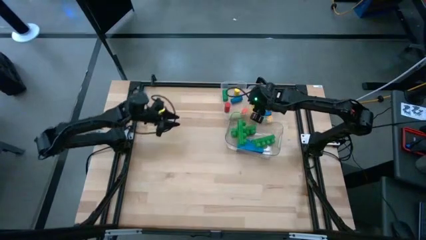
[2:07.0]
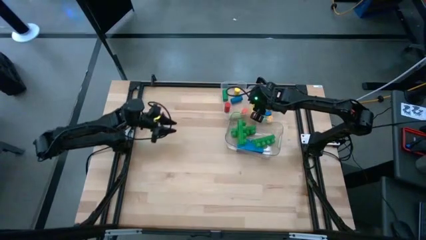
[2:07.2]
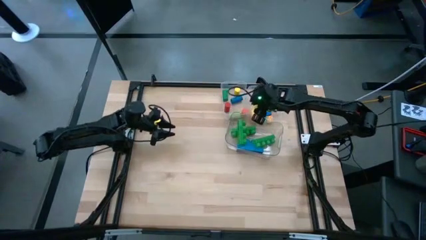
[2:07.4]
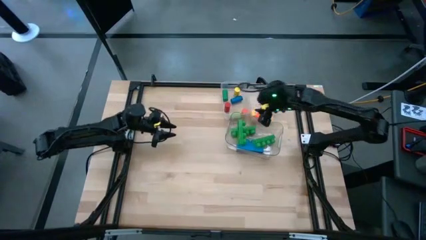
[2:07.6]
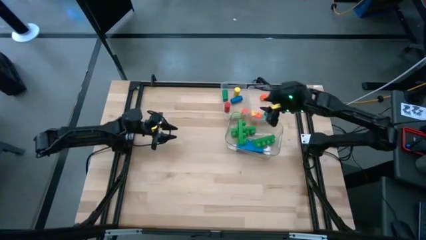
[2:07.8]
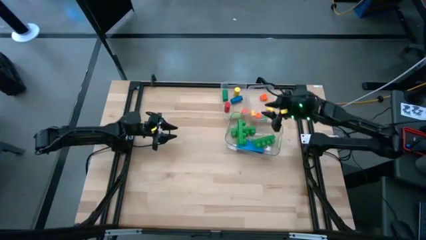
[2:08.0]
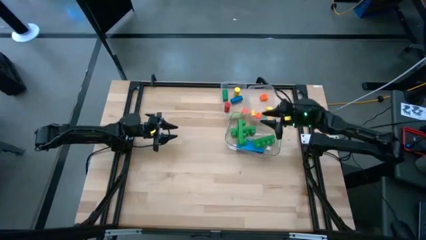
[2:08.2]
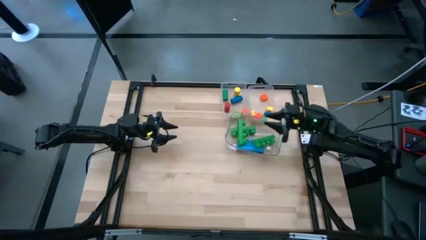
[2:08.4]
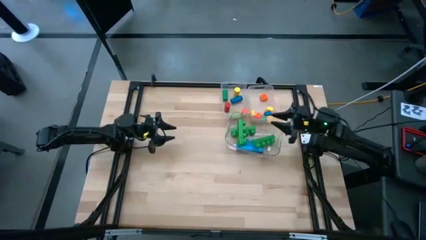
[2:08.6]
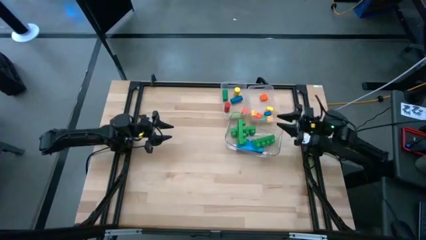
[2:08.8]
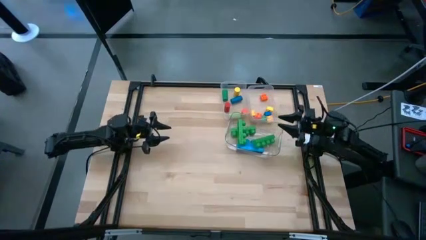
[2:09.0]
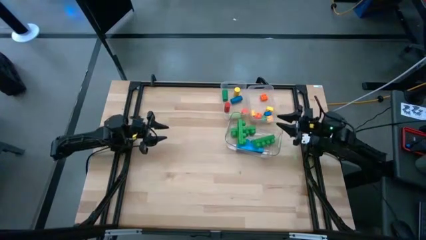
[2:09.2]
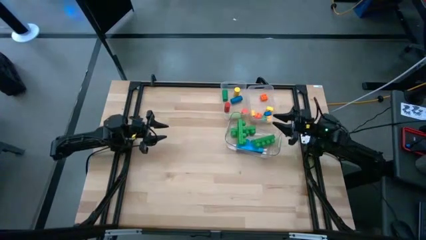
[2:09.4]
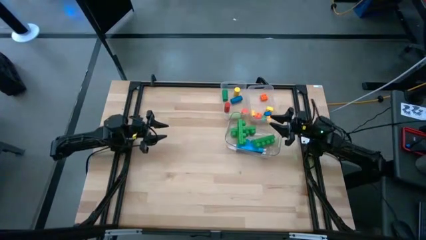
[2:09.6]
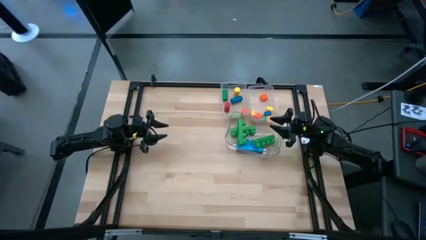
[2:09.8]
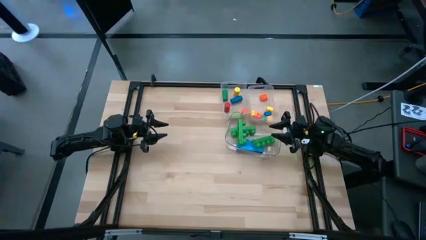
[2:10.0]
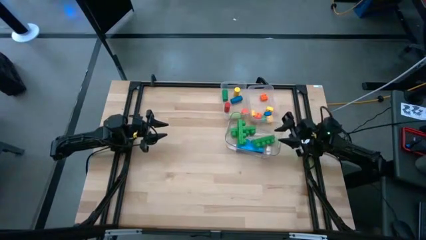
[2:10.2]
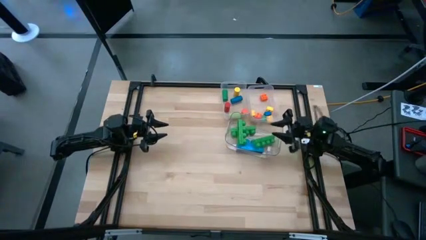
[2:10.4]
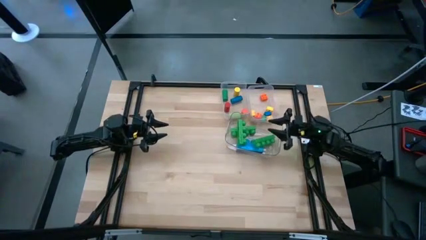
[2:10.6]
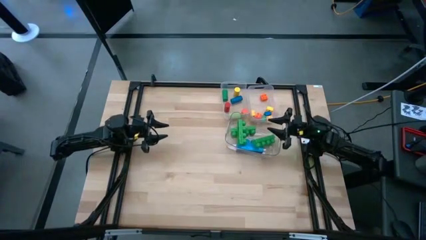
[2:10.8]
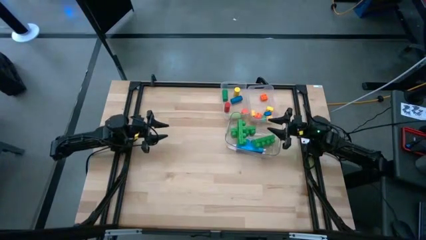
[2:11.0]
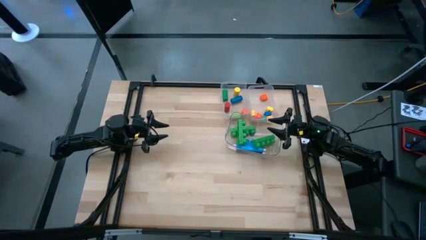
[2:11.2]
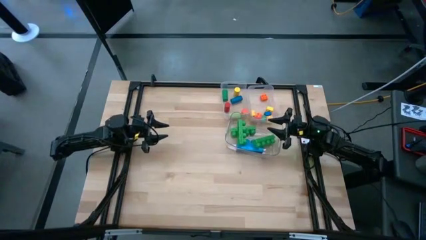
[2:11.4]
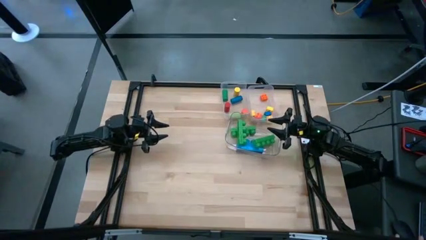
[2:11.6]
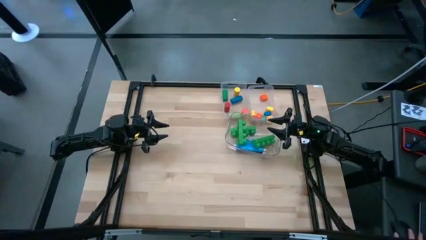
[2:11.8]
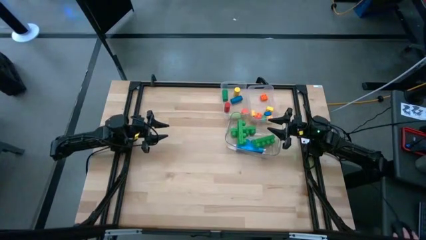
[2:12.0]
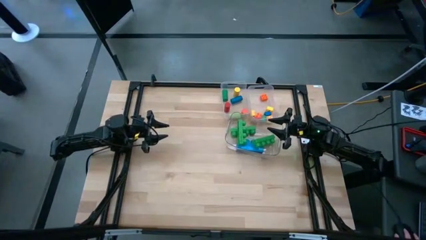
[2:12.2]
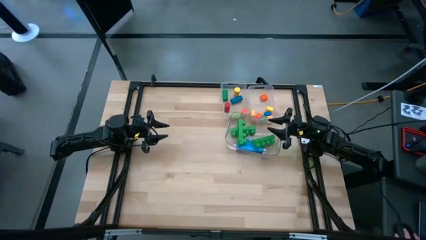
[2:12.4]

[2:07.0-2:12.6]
Task: Sort blocks by size
Return to Home Position

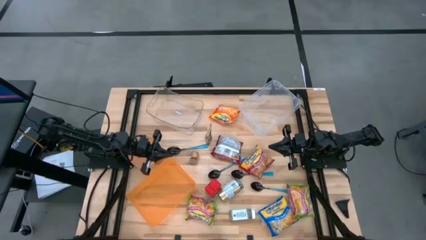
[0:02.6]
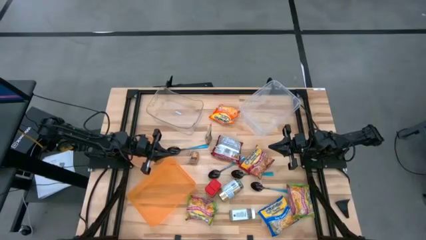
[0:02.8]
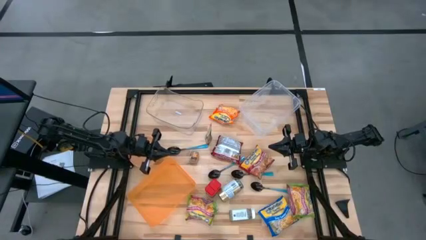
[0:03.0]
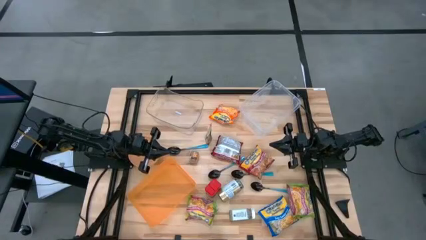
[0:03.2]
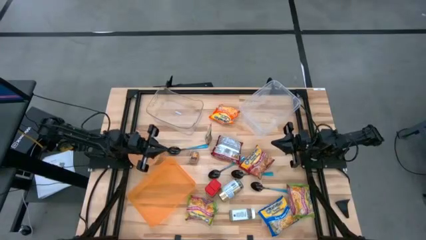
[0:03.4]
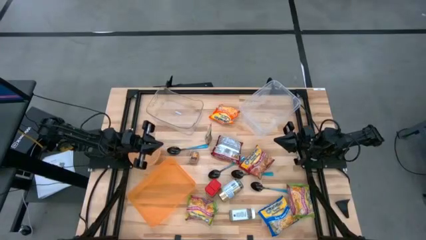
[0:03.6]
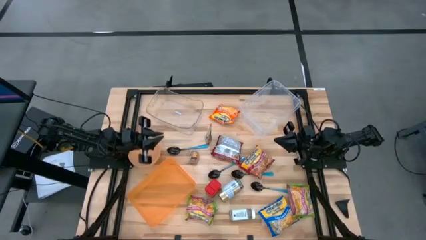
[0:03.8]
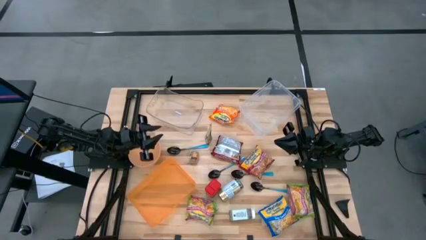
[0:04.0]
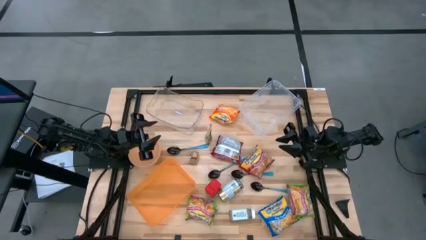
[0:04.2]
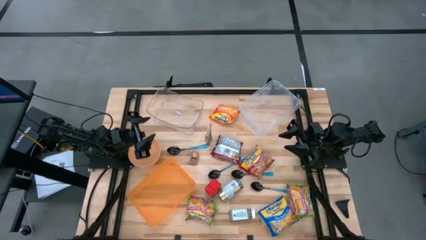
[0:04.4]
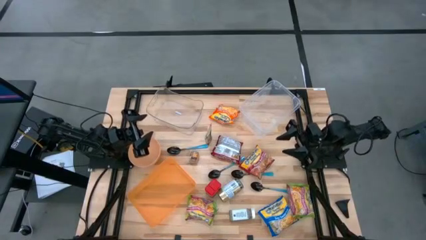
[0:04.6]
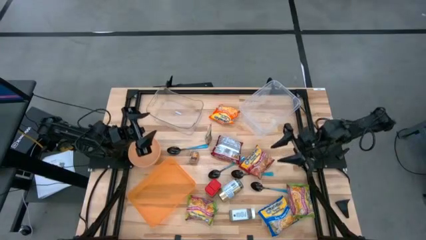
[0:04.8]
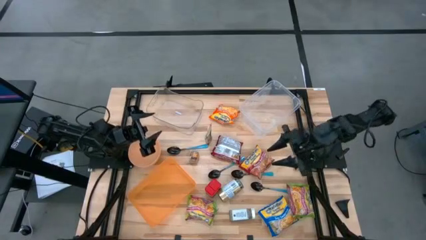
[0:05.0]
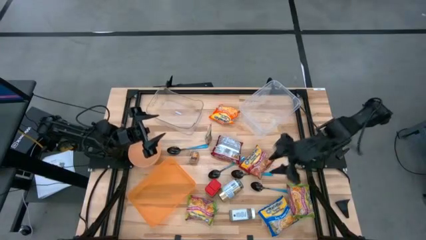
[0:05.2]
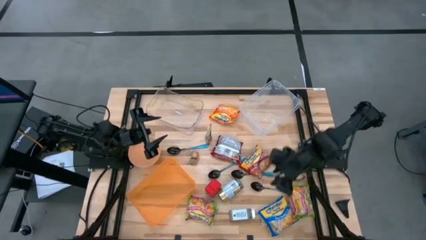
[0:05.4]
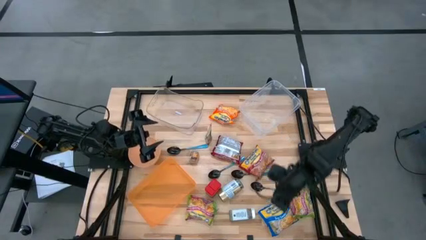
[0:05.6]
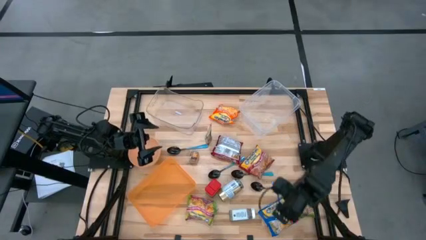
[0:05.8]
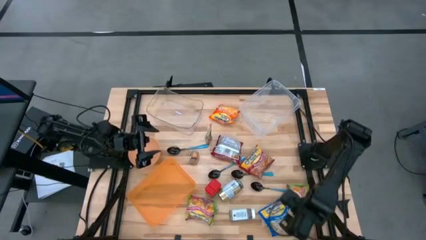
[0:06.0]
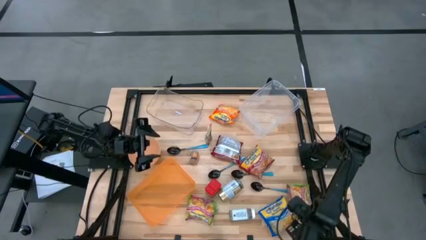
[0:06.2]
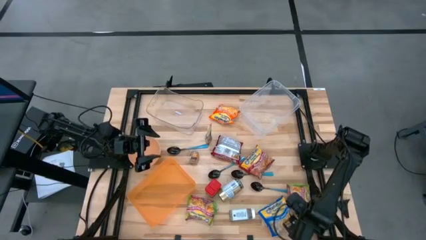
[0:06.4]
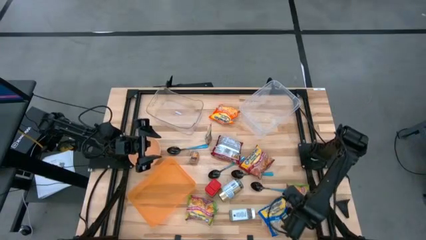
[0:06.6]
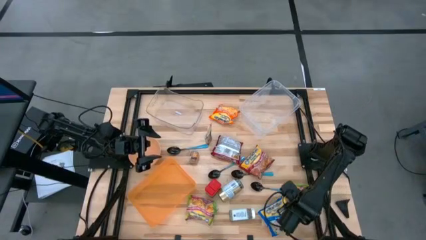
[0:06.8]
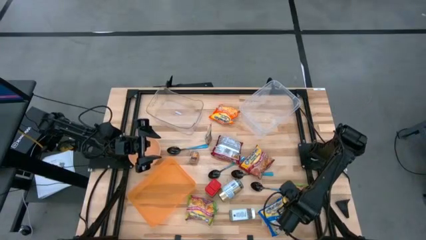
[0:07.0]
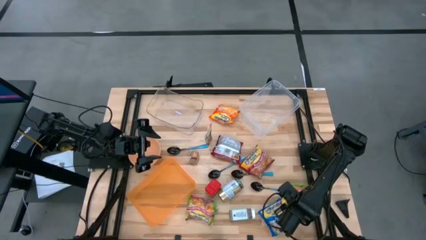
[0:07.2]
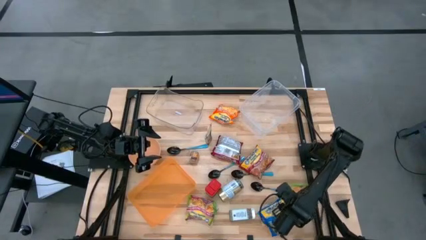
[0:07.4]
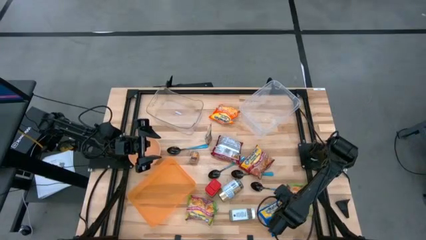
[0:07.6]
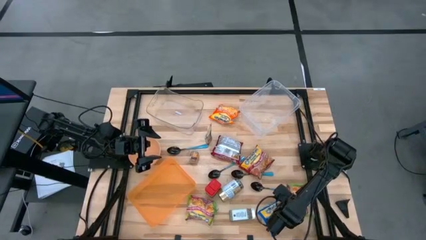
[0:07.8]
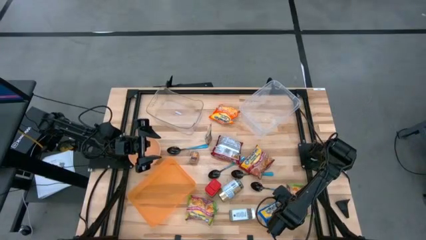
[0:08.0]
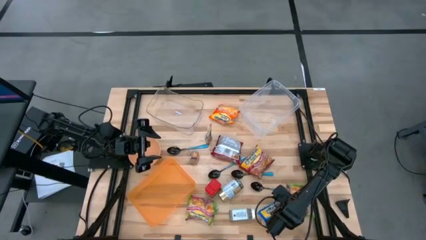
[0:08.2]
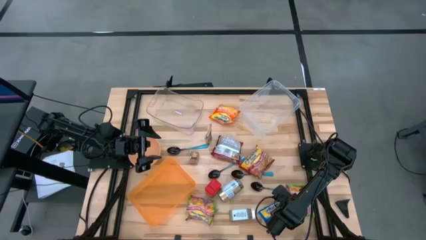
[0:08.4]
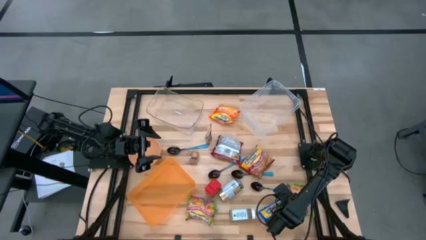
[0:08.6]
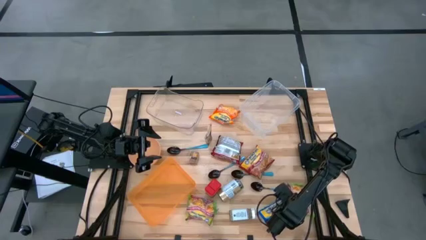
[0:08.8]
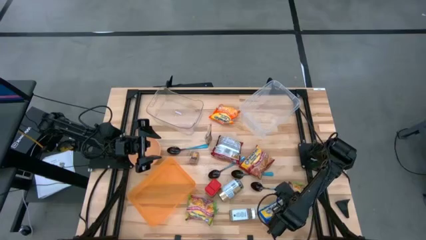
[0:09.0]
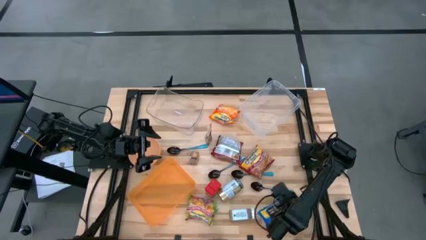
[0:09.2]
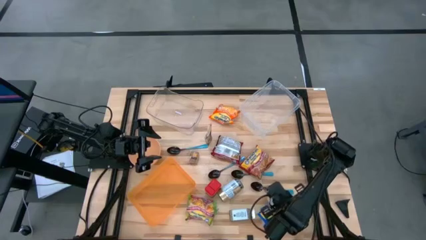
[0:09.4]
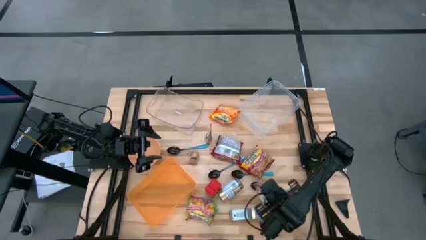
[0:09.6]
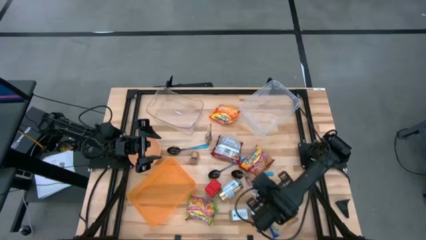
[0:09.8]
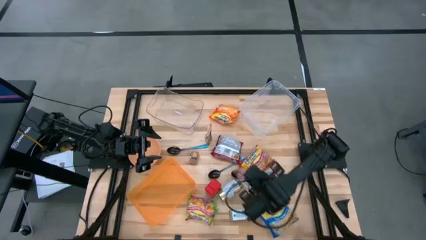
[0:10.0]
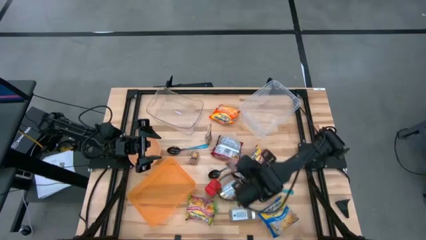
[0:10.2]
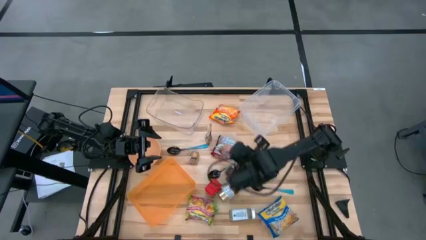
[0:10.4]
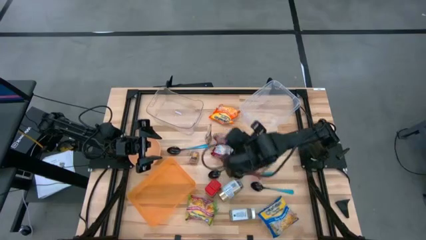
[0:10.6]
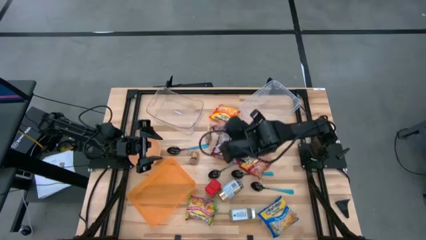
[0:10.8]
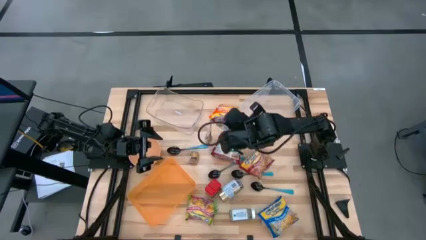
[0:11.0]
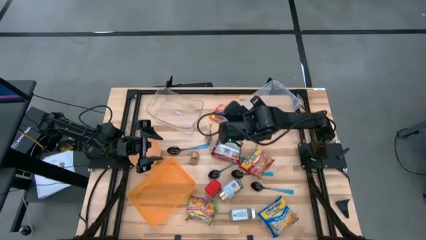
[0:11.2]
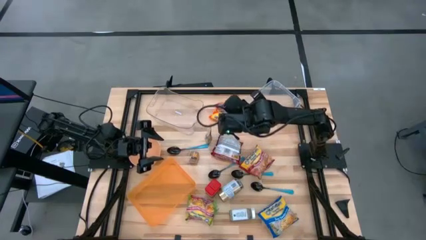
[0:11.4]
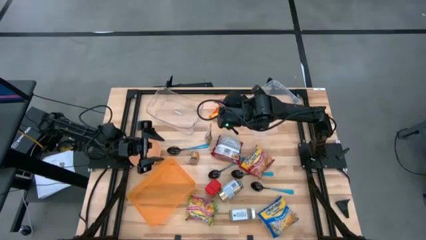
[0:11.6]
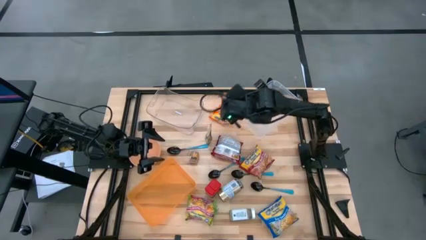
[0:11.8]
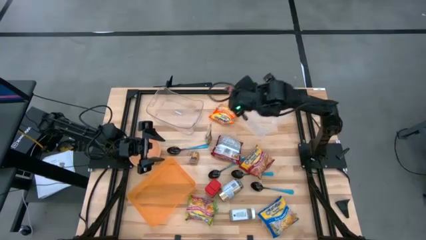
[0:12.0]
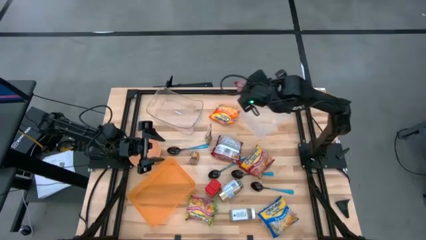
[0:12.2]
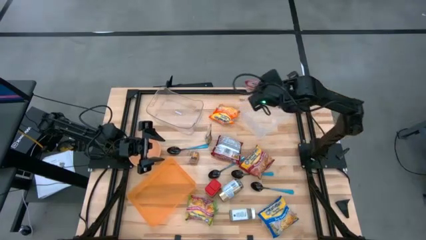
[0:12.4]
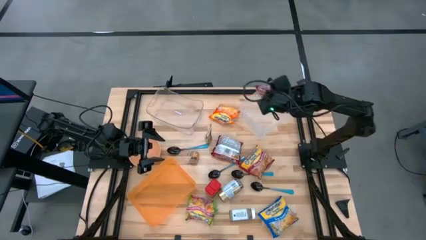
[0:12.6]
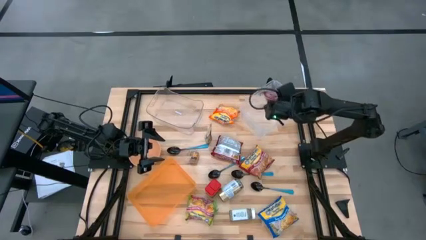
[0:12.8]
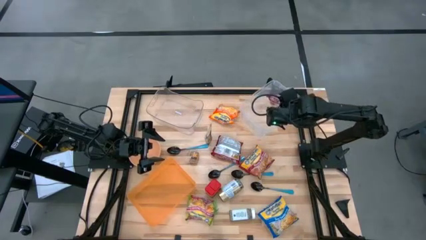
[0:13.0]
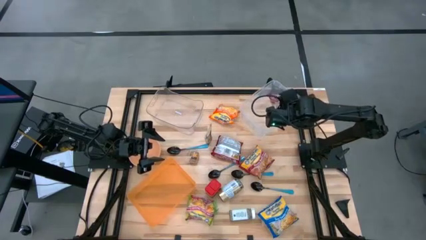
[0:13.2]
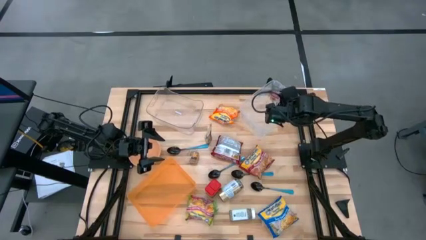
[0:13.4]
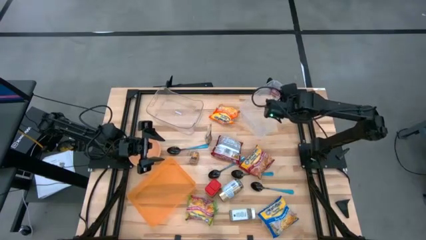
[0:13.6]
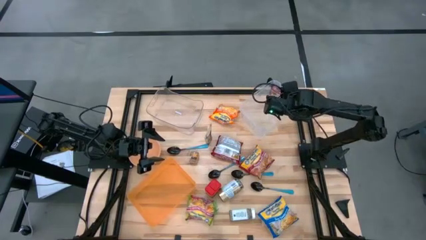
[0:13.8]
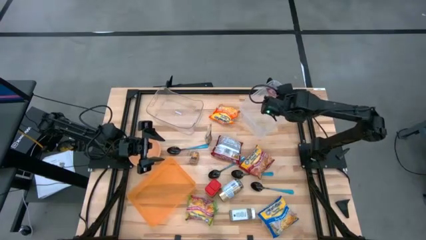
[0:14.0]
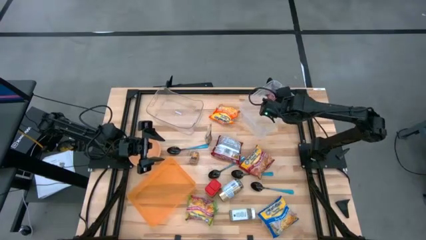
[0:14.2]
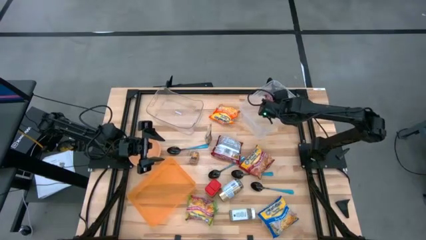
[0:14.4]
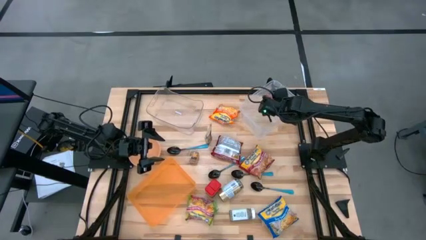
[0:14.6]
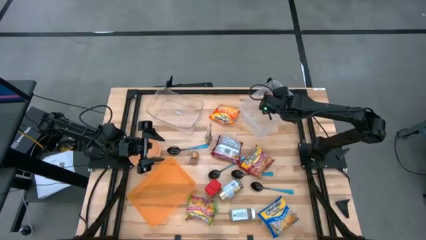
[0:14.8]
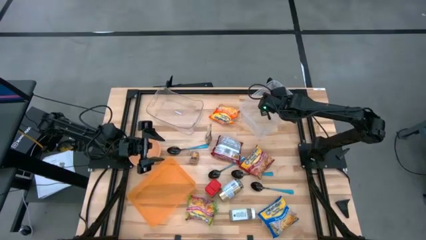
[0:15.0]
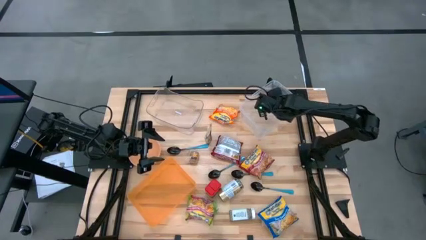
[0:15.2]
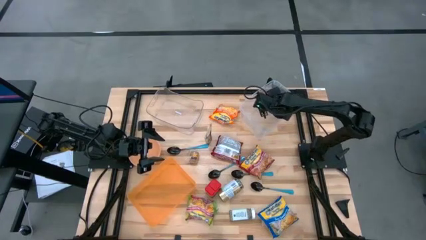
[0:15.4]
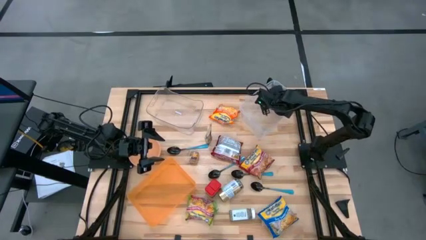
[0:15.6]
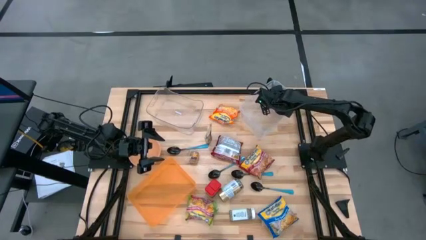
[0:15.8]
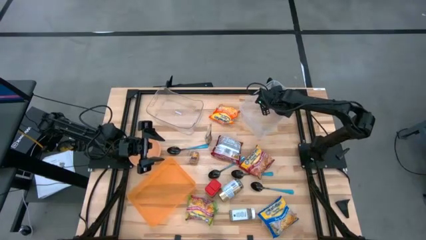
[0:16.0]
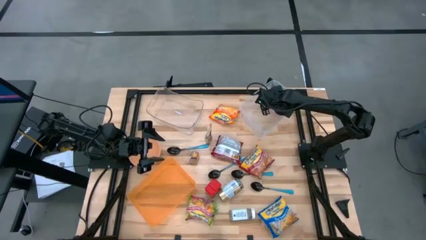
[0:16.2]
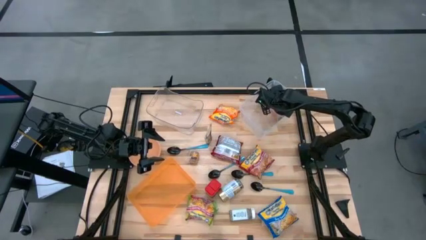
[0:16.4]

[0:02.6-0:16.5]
Task: Pick & Place Food Item
Put the green noodle pack into the right transparent bin
